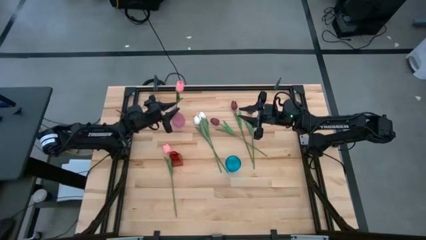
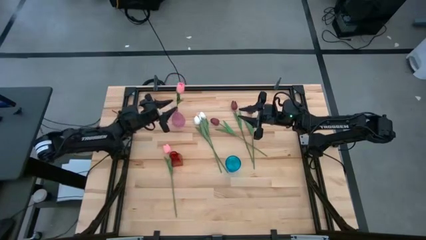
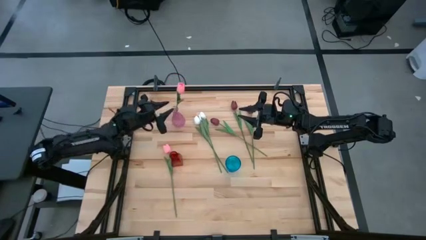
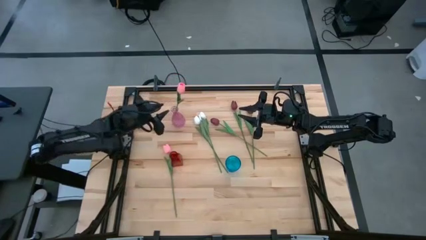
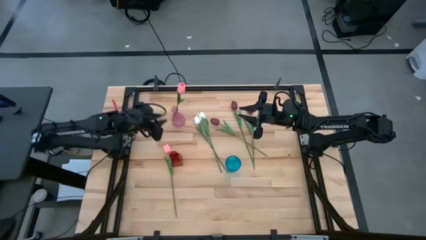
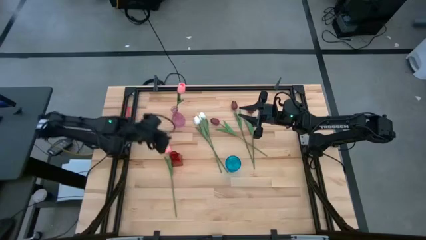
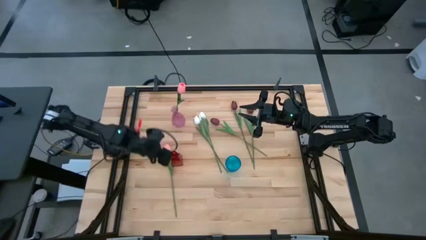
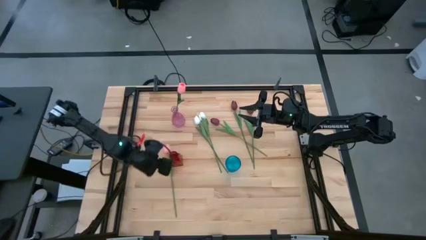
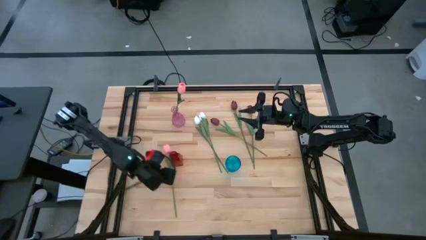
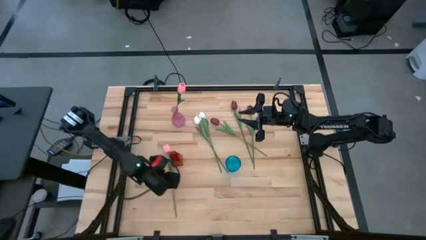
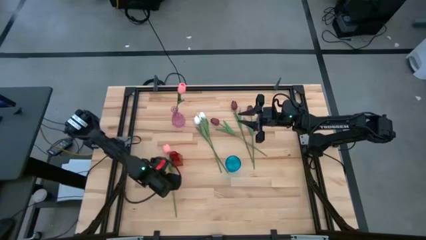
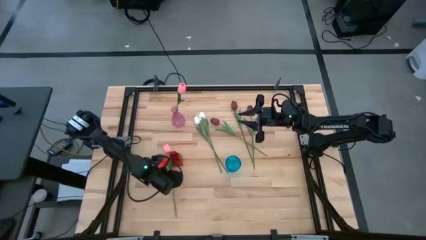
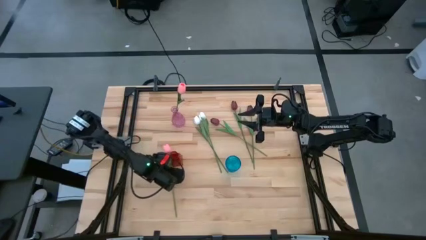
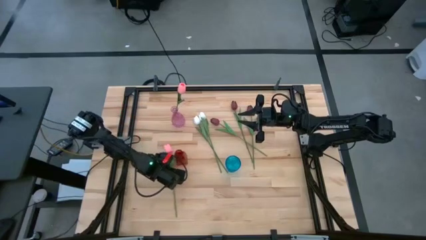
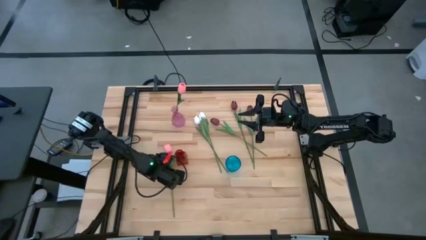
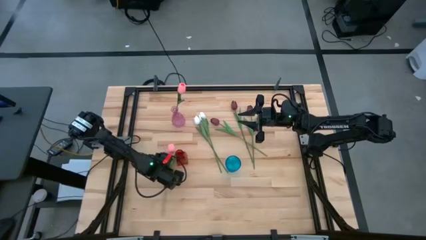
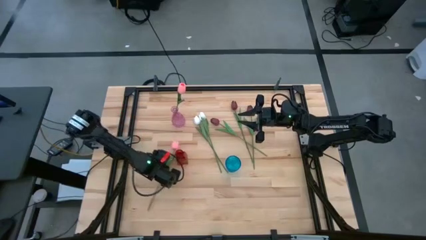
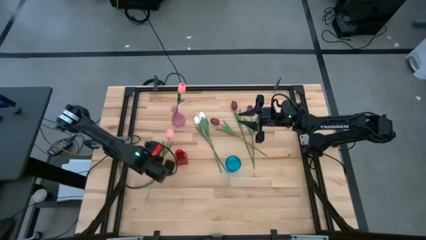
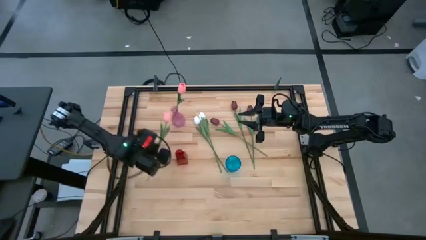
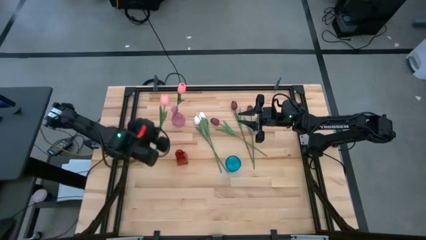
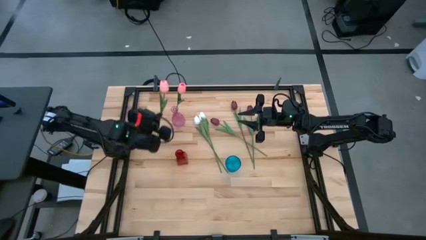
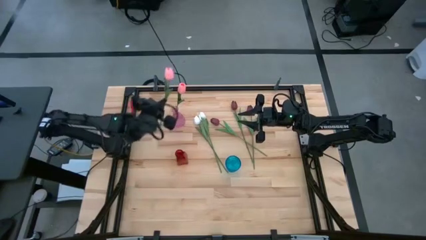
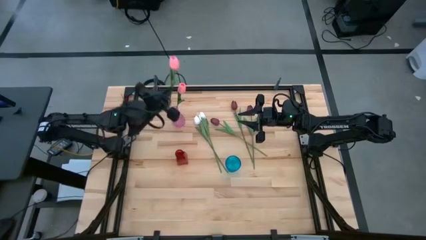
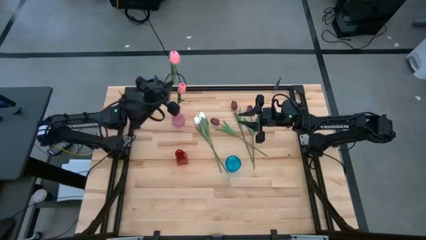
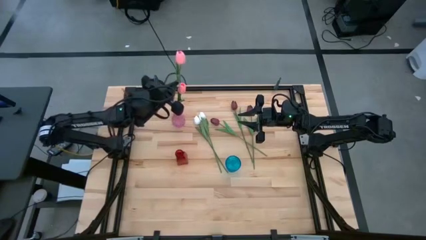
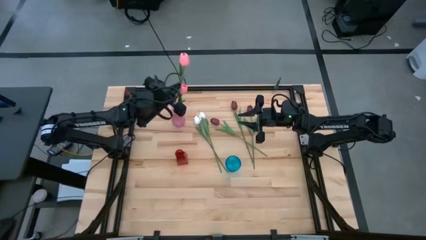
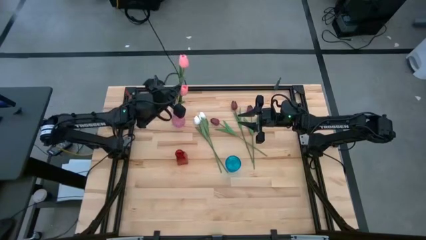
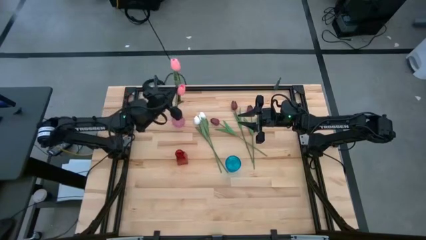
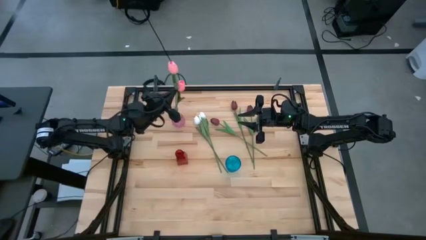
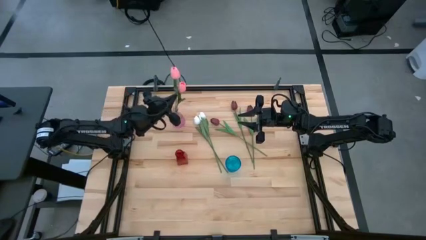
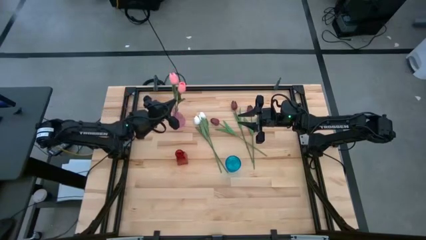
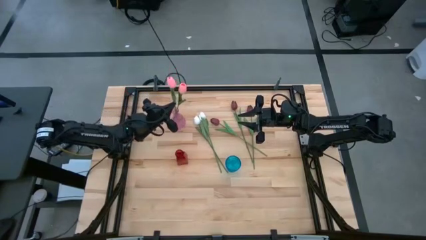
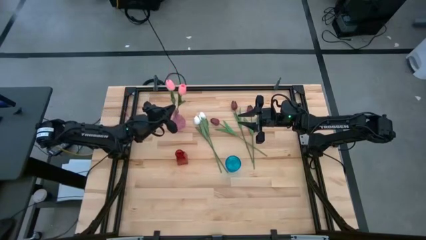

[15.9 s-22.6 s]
Task: Sort flowers into vase by color
Put the pink flower into the pink vase

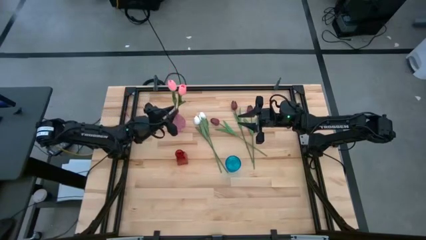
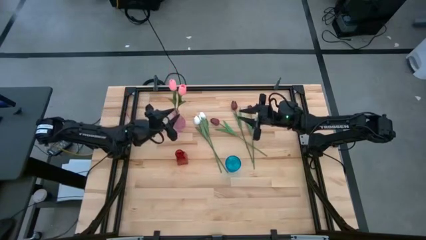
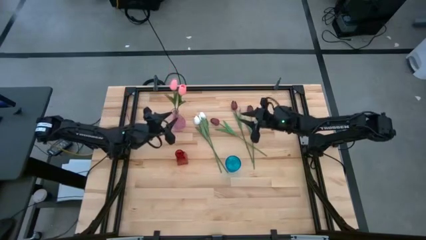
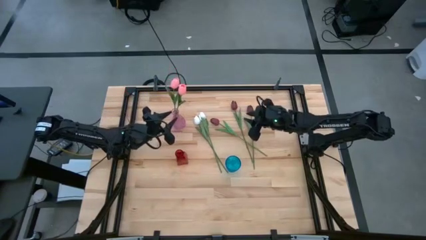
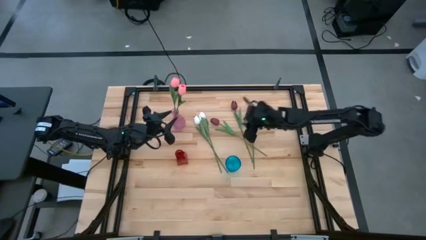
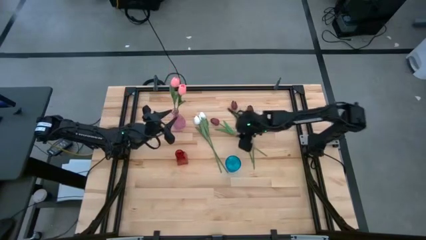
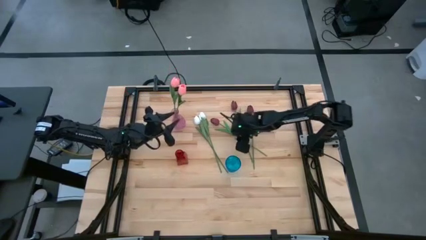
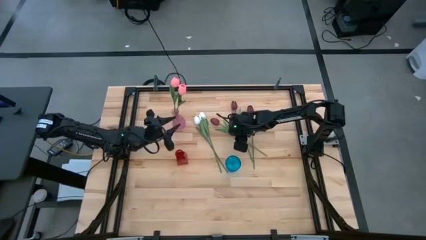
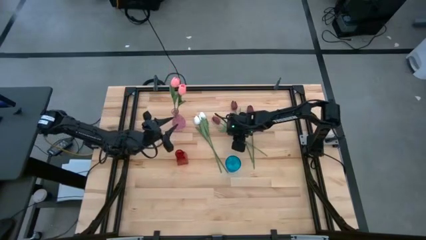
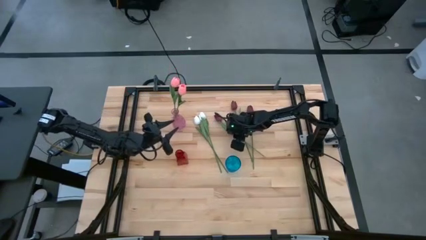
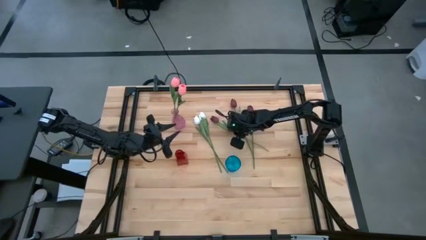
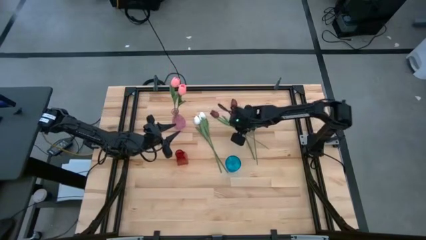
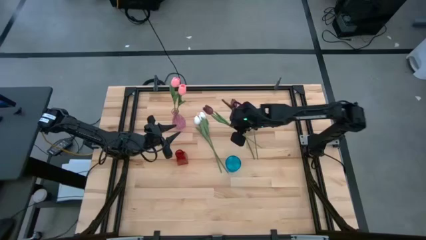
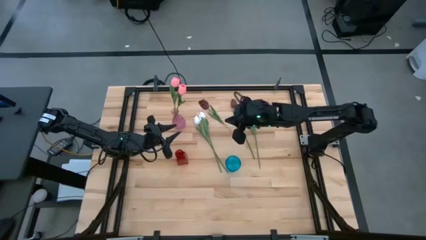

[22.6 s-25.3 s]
Put the left red flower into the blue vase

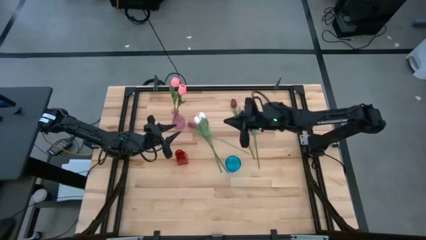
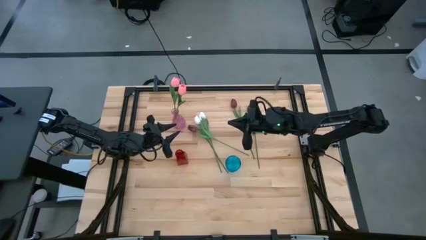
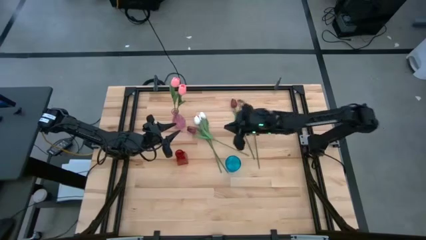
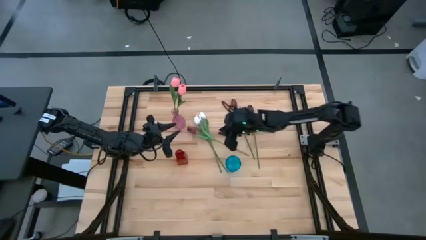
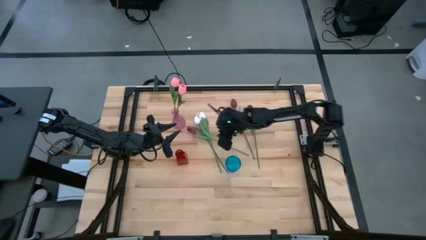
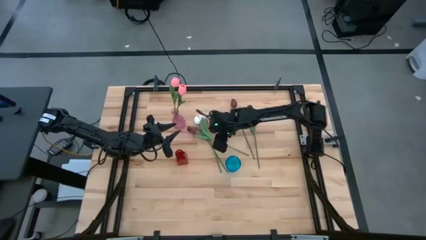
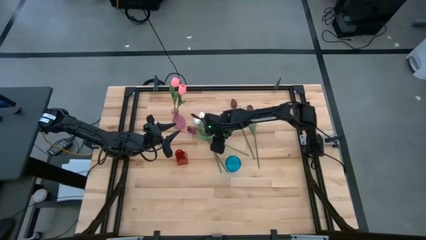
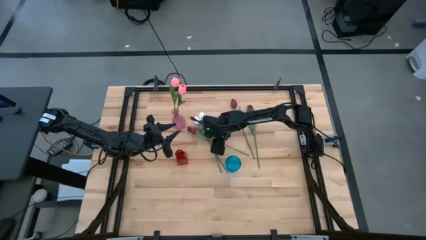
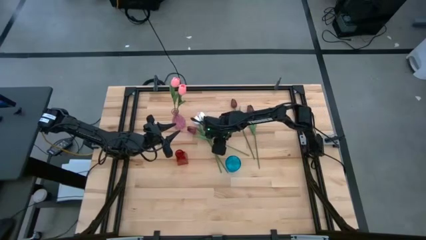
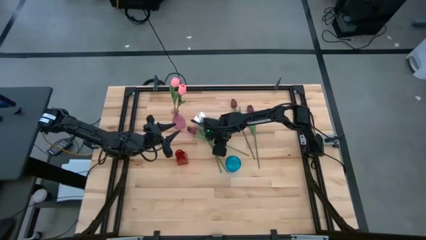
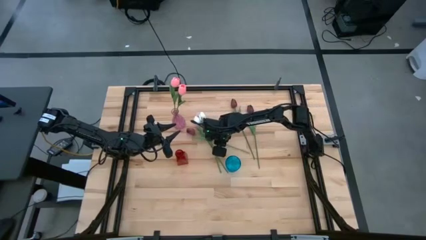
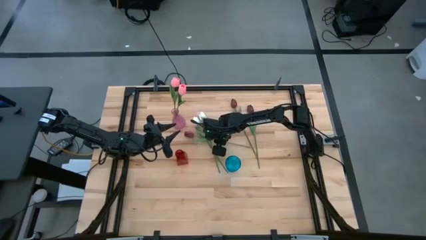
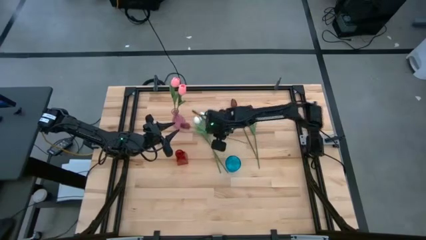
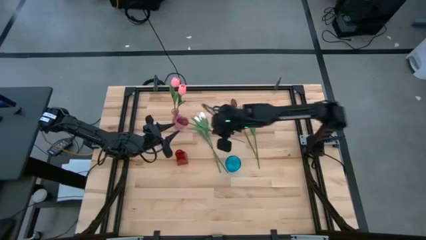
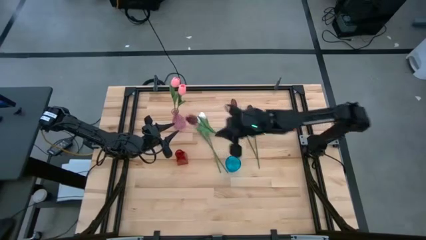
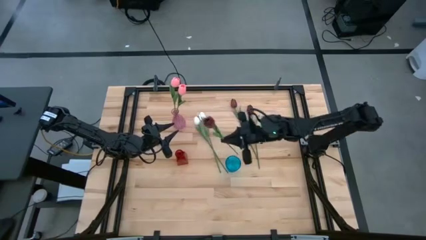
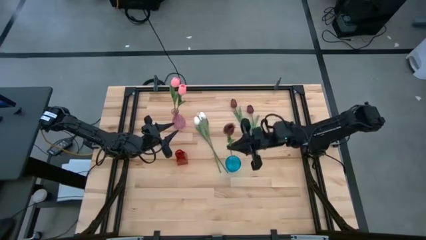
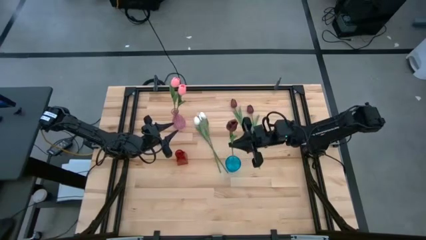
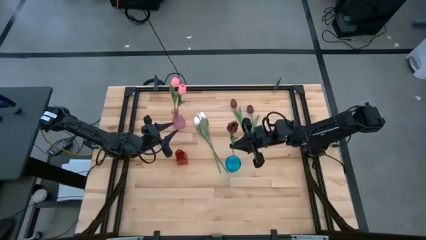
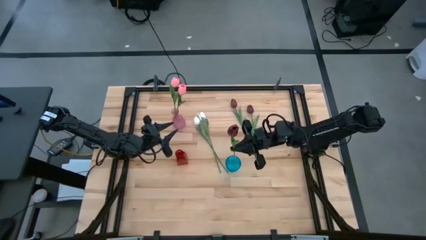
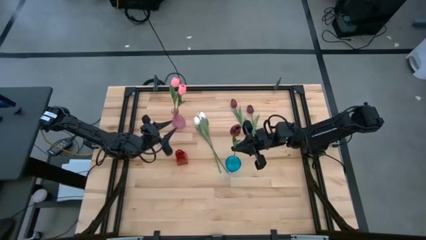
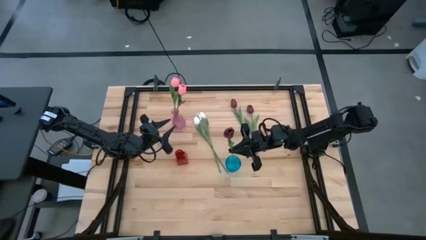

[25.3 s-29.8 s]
Put the left red flower into the blue vase
